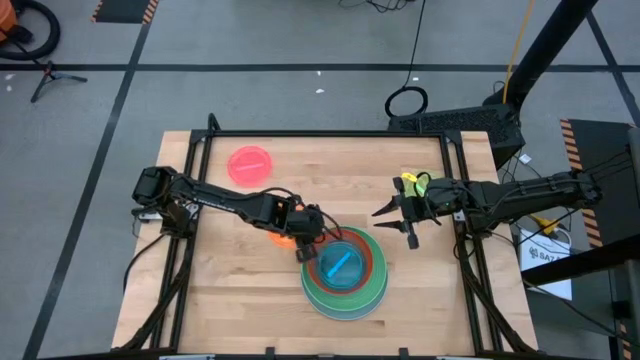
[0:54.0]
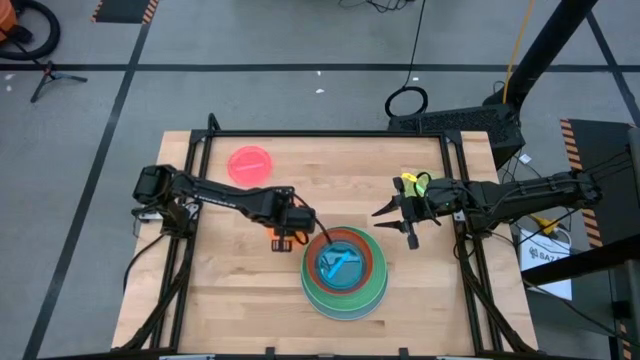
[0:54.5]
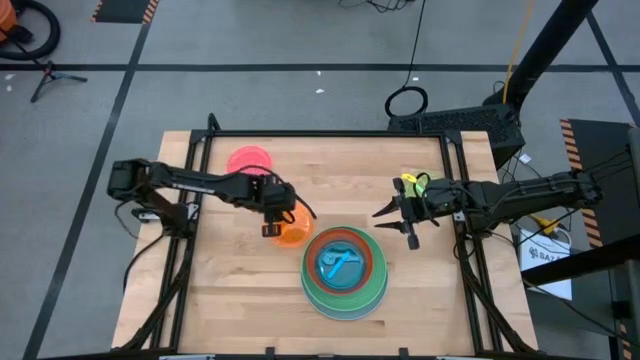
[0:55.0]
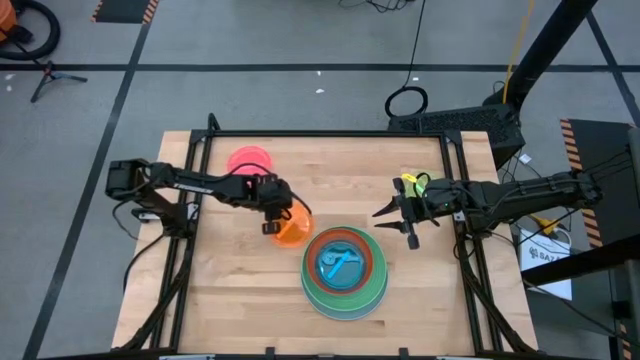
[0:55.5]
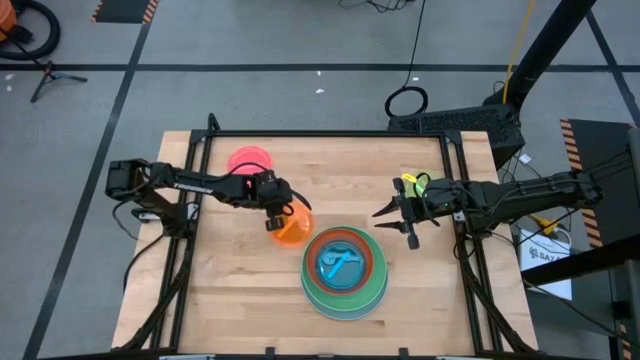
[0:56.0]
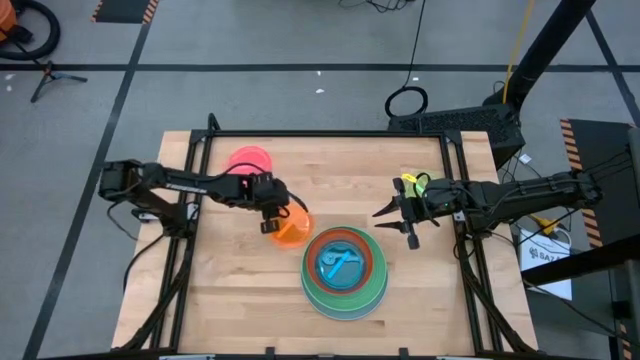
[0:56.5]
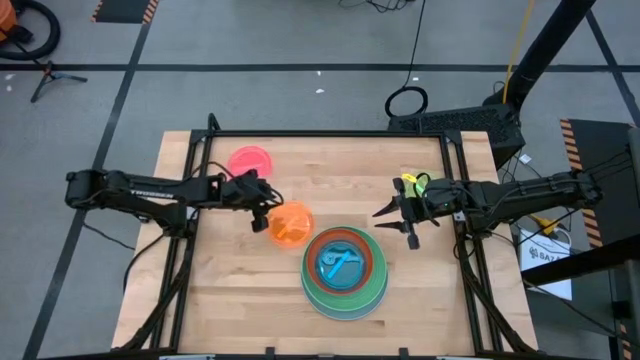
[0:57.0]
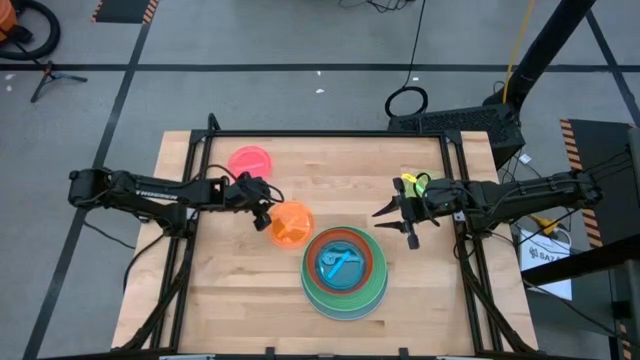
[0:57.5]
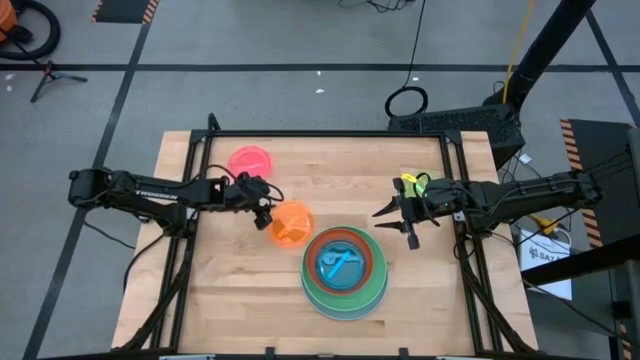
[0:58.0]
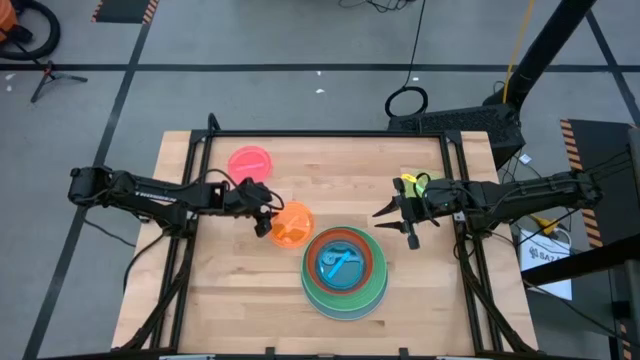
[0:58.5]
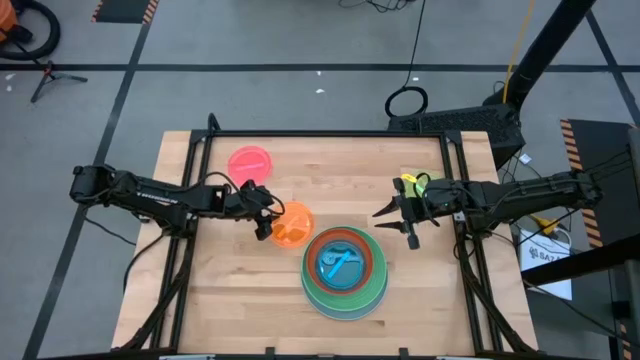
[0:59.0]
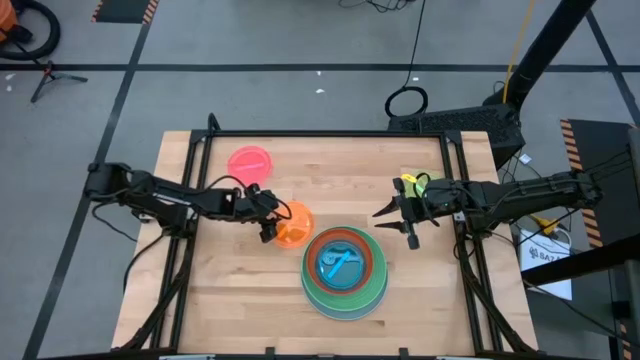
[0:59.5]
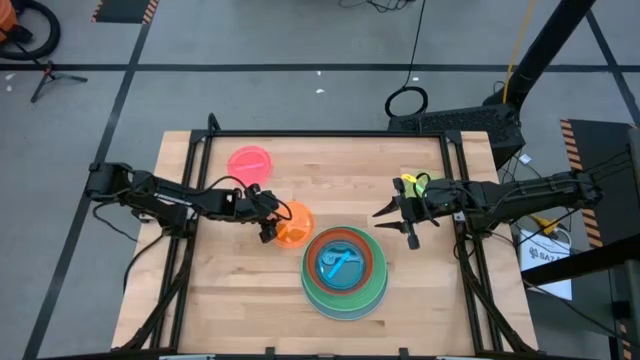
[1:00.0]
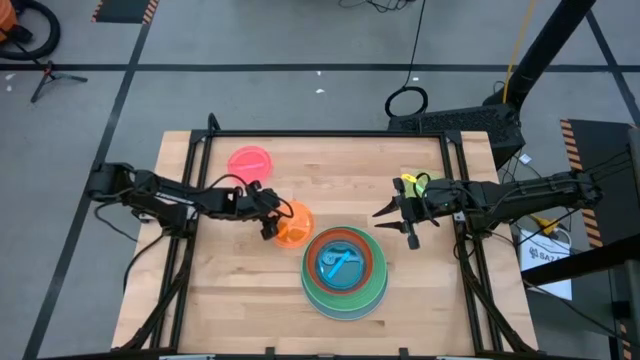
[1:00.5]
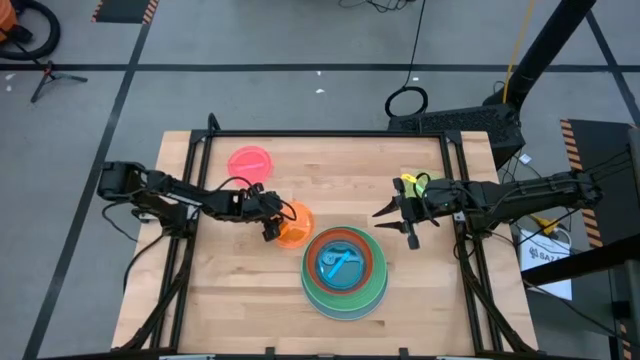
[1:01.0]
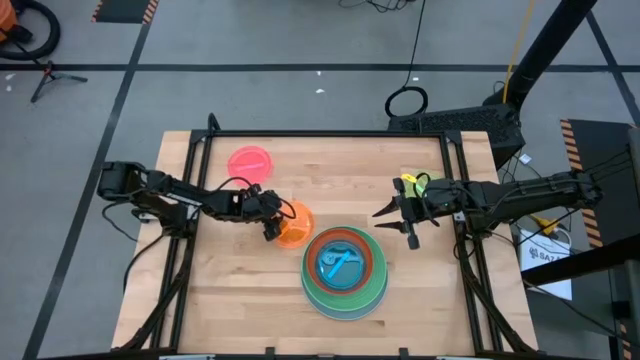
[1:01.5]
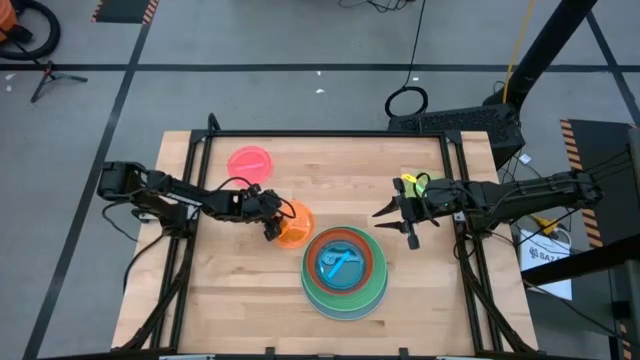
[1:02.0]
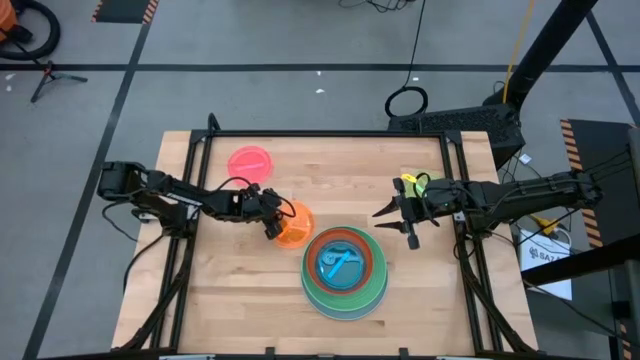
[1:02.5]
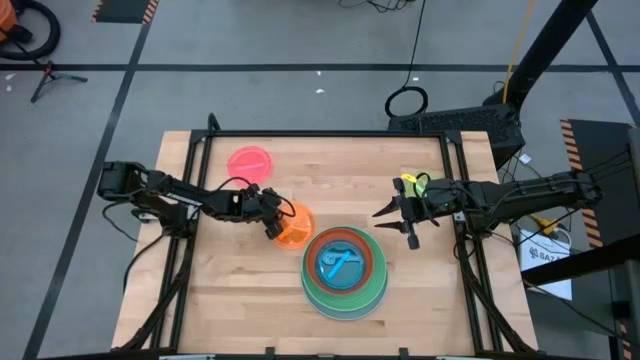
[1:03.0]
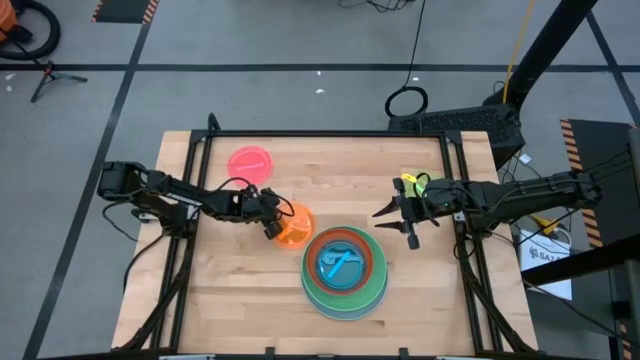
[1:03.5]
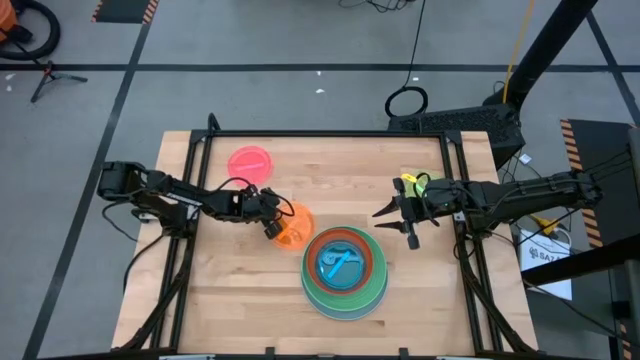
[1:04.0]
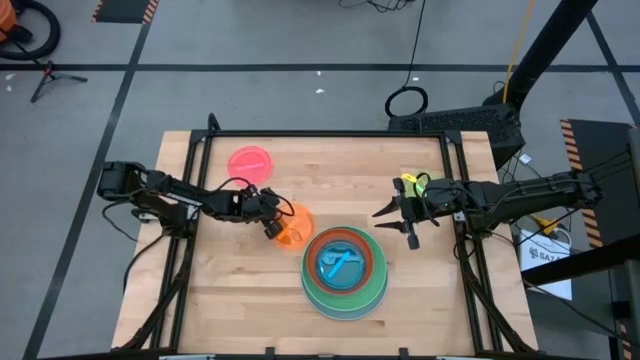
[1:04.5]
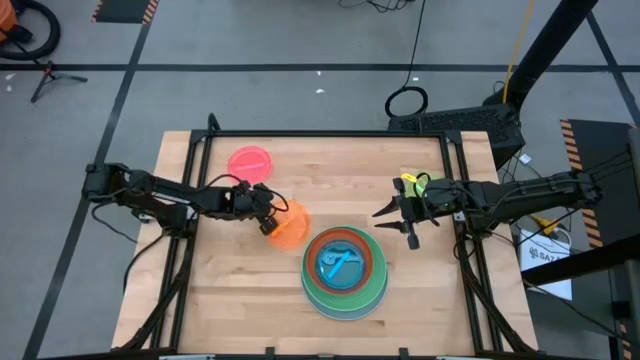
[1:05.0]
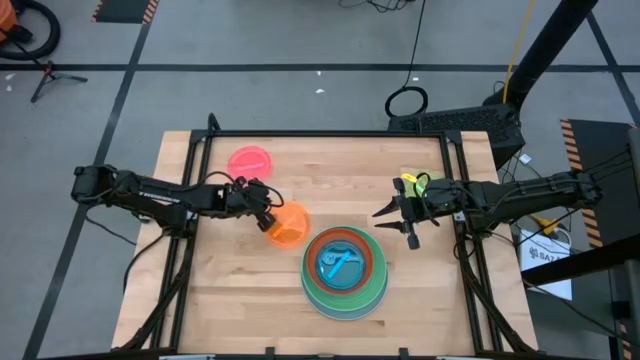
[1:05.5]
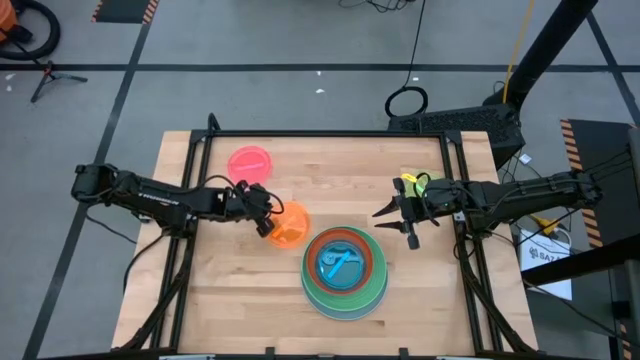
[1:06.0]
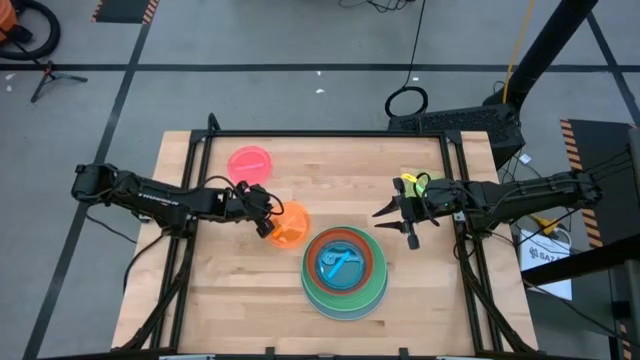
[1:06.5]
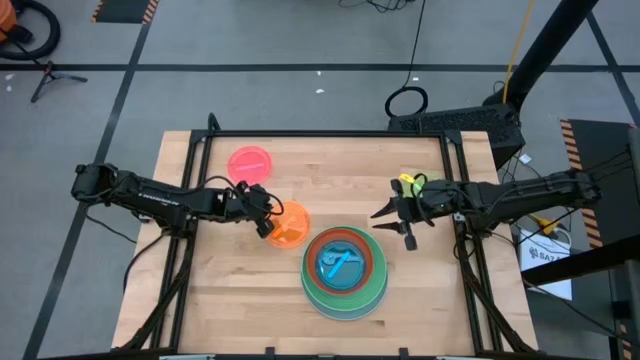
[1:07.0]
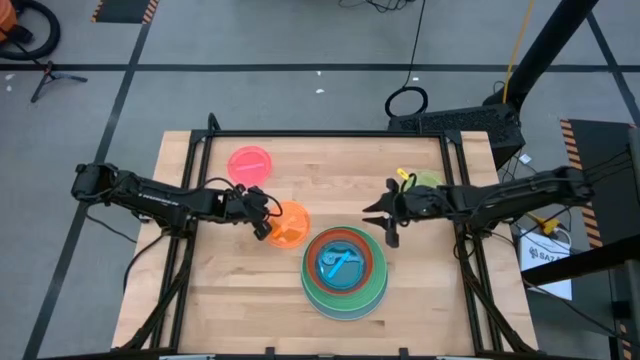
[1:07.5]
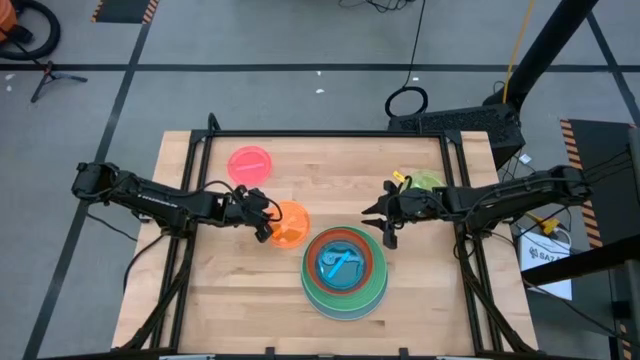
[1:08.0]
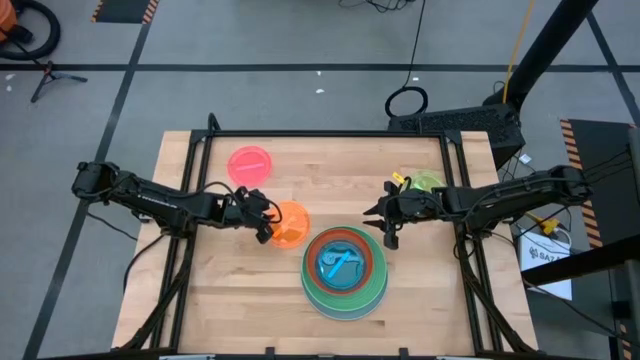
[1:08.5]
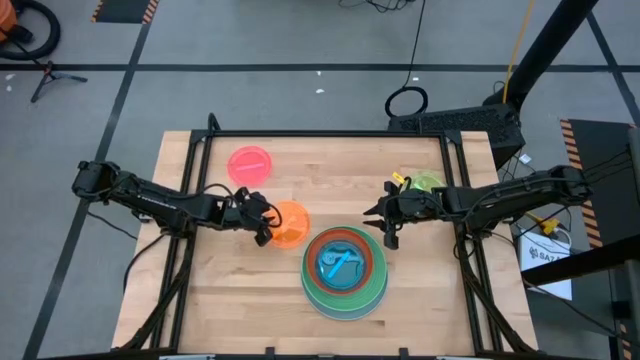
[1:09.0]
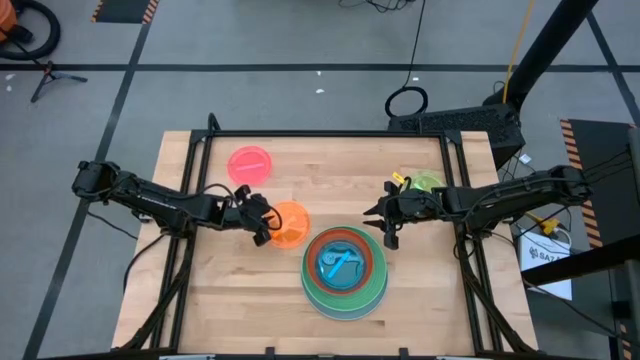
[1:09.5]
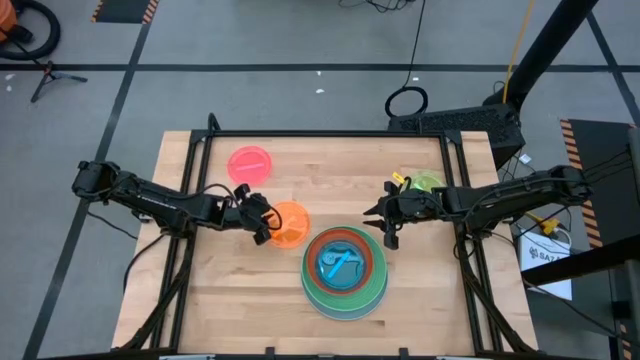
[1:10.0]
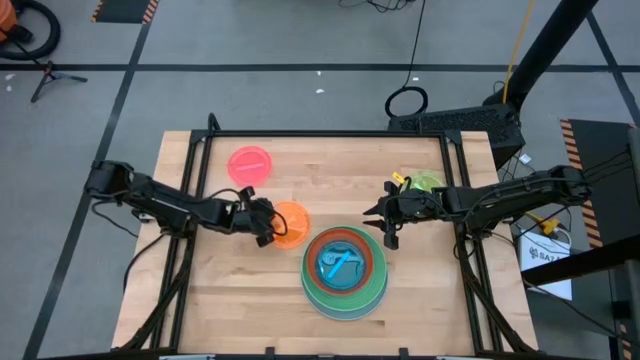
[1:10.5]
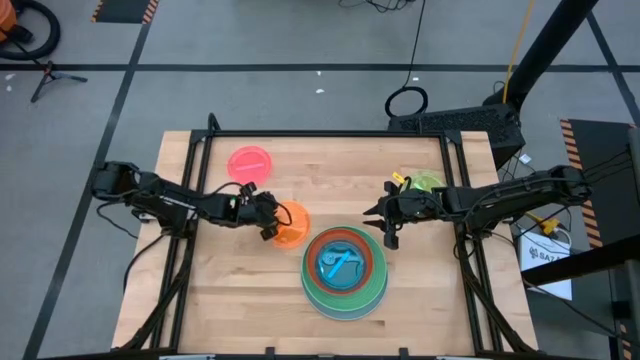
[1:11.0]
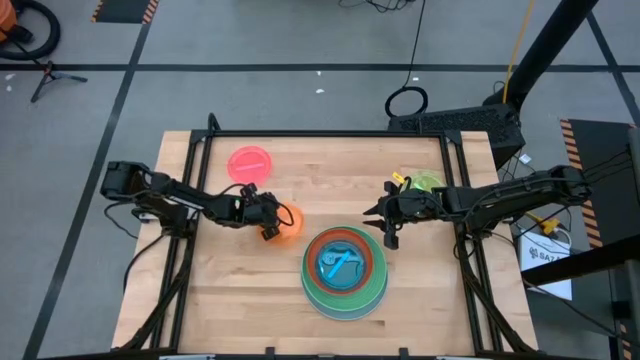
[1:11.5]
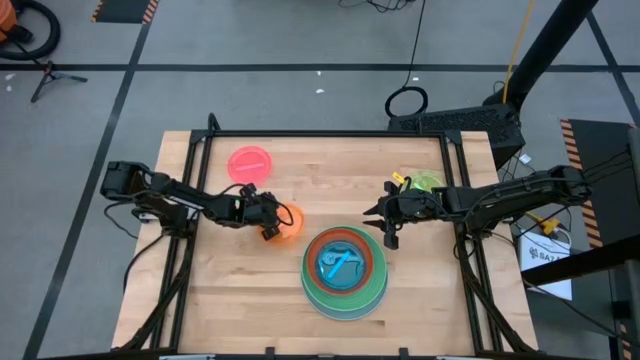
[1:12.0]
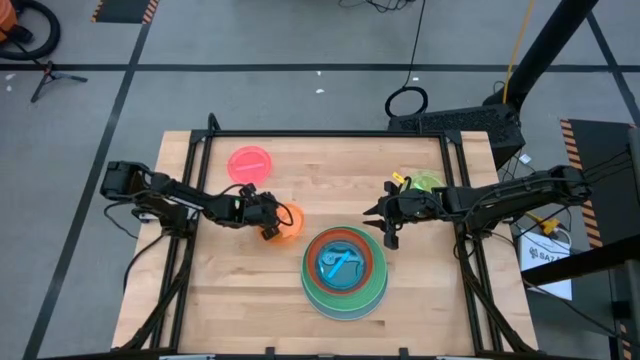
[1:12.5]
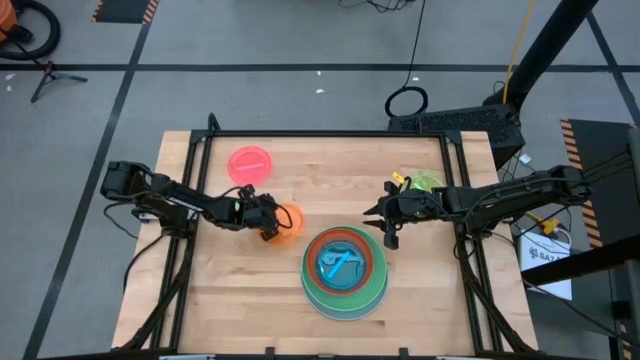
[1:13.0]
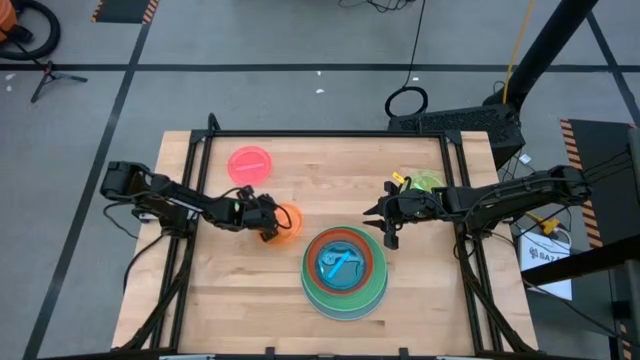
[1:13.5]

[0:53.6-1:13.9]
Task: Stack plastic plates
Stack the orange plate on top of the blue plate

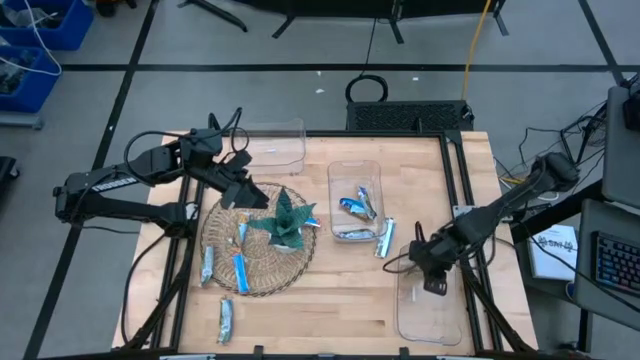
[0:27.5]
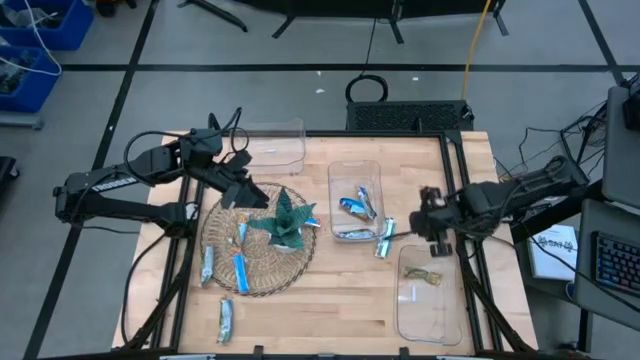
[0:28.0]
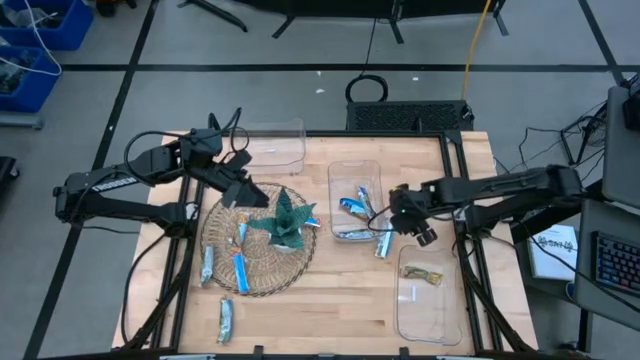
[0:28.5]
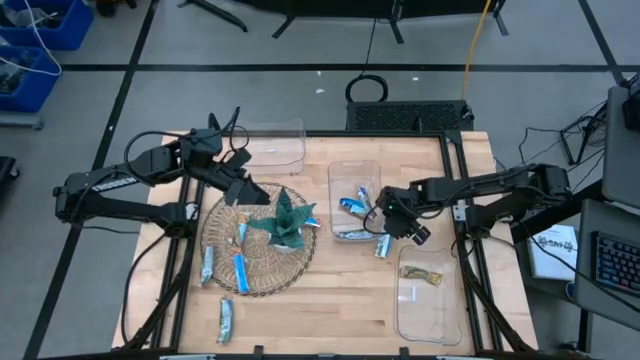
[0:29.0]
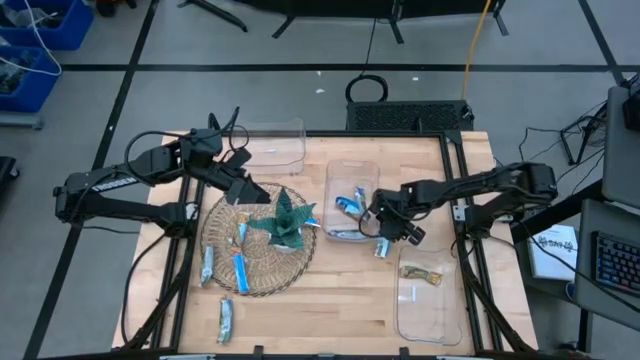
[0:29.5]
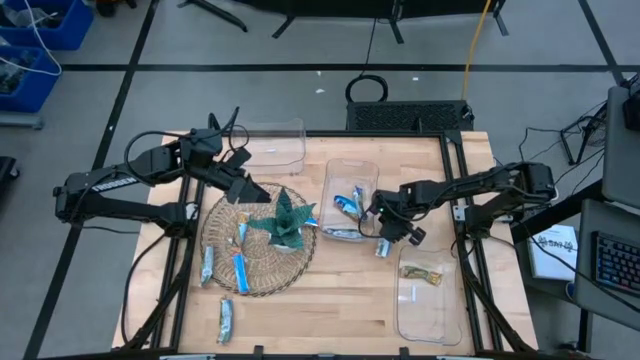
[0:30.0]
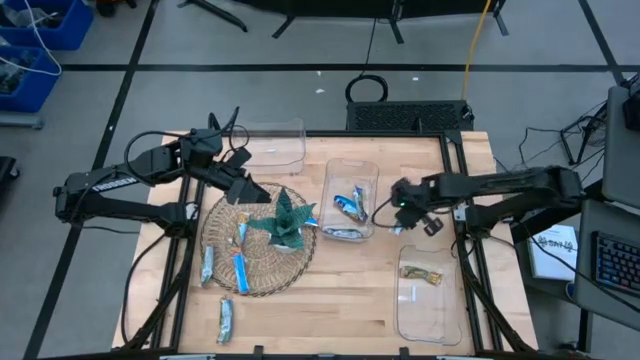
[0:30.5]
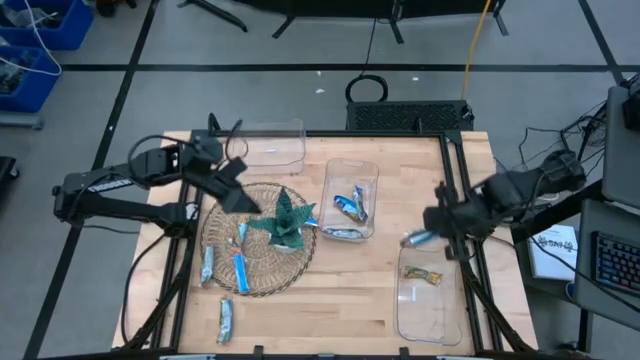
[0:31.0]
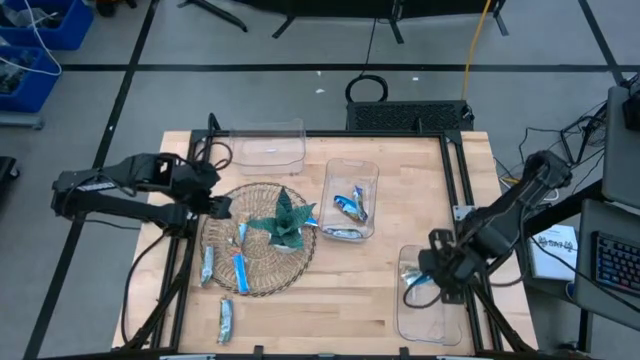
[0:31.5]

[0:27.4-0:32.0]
Task: Pick and place Granola Bars by type
Put the orange granola bar into the bottom transparent bin
